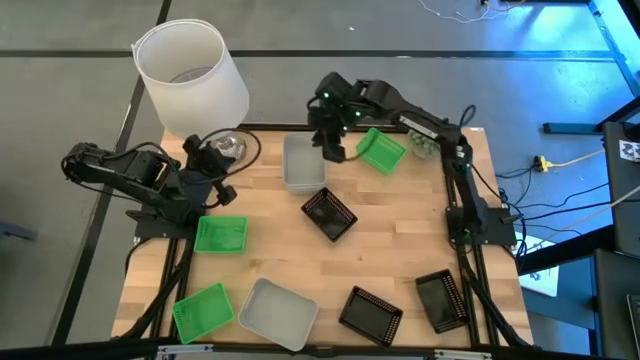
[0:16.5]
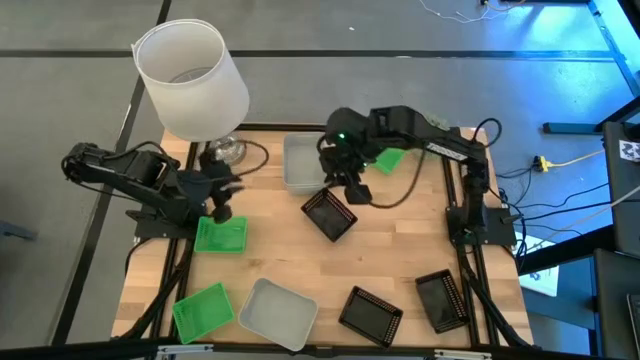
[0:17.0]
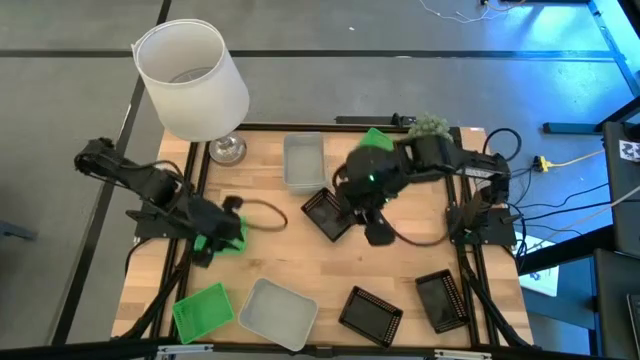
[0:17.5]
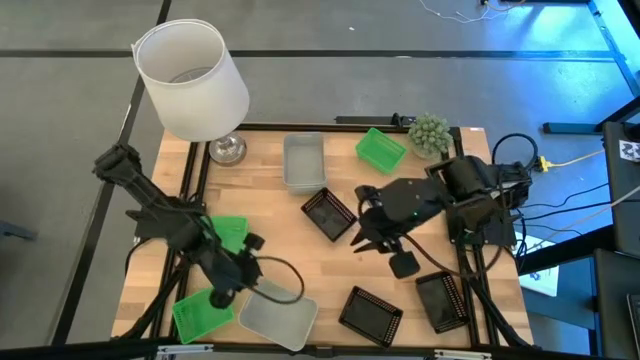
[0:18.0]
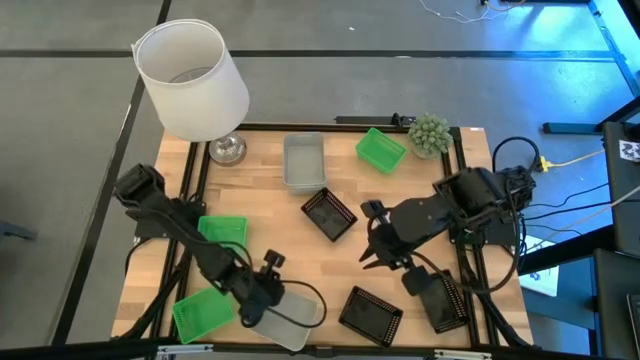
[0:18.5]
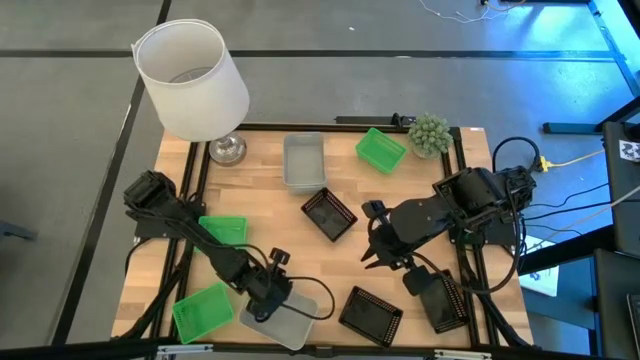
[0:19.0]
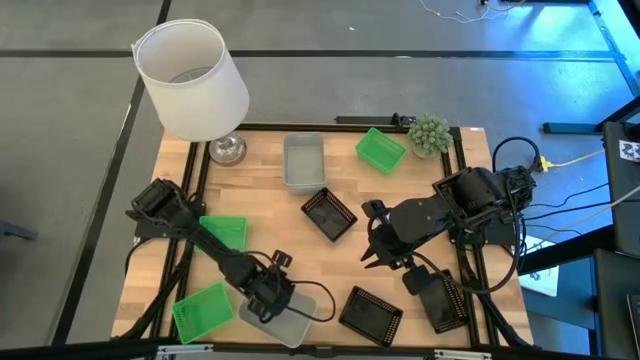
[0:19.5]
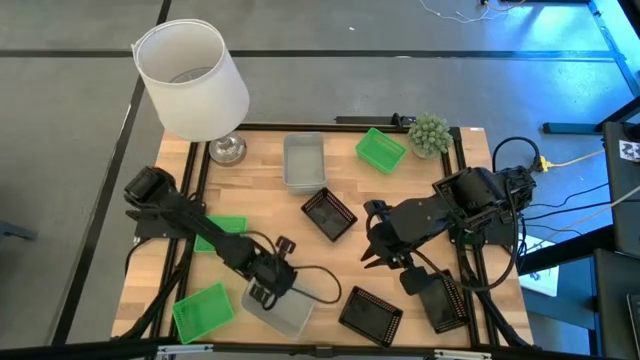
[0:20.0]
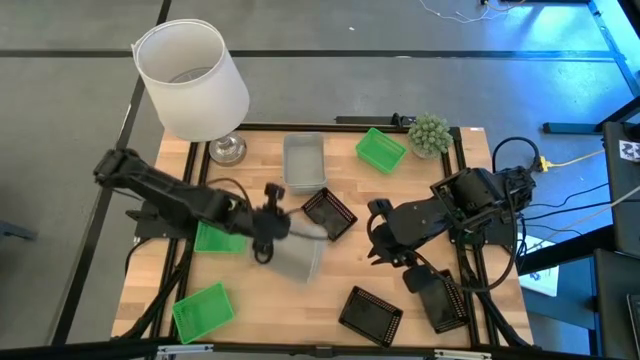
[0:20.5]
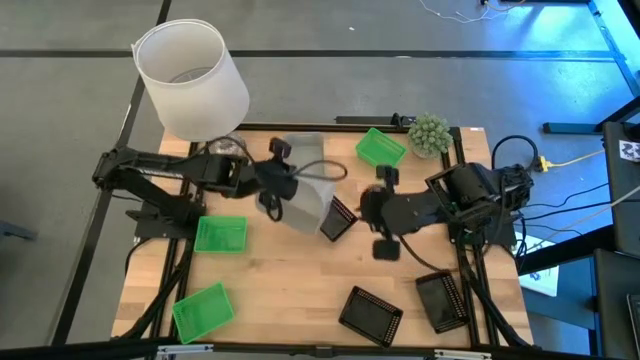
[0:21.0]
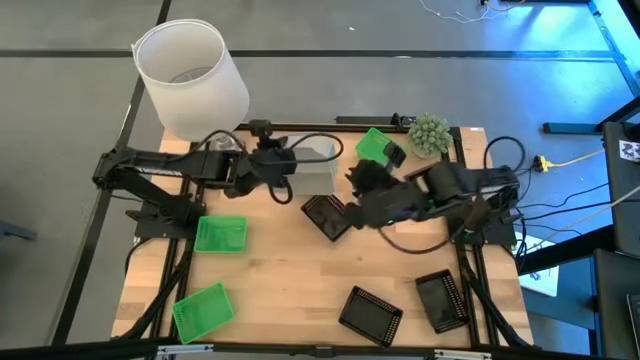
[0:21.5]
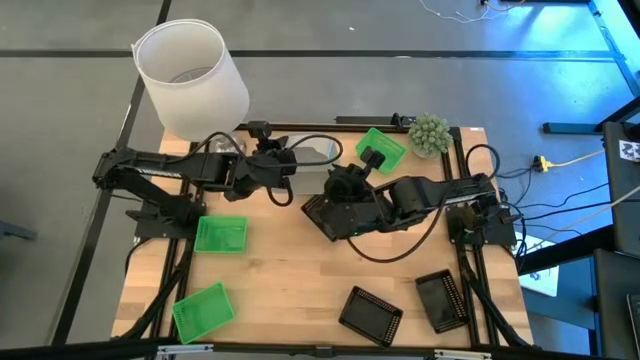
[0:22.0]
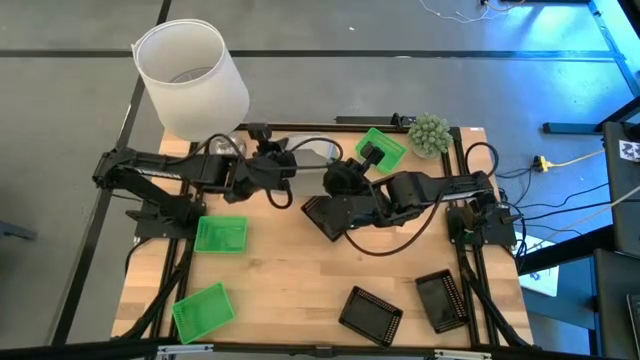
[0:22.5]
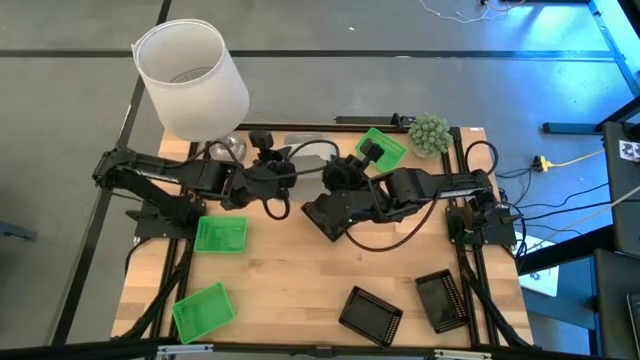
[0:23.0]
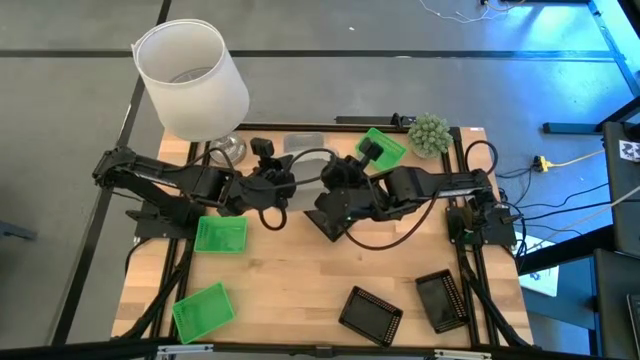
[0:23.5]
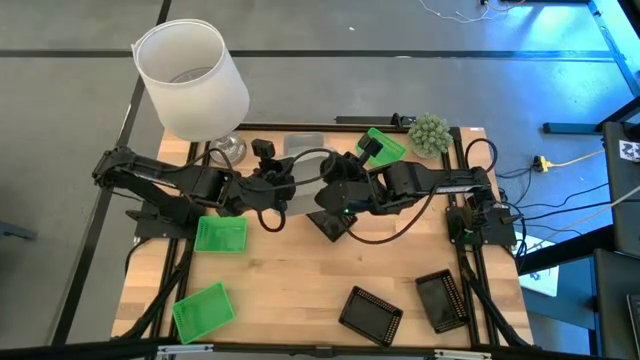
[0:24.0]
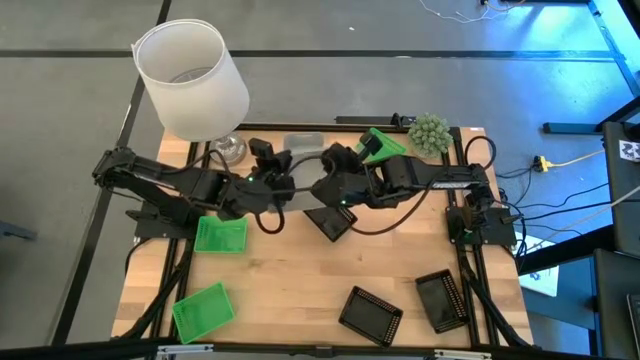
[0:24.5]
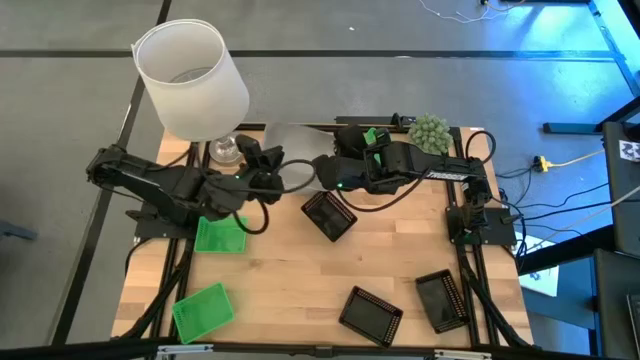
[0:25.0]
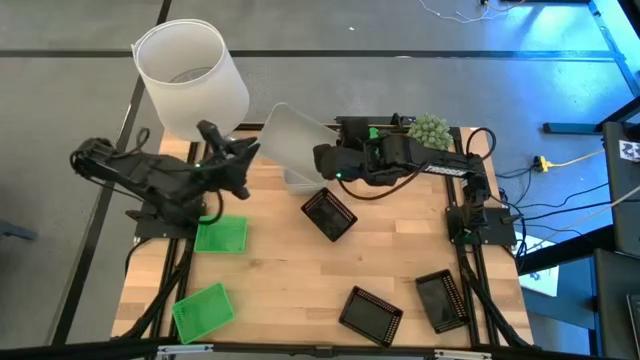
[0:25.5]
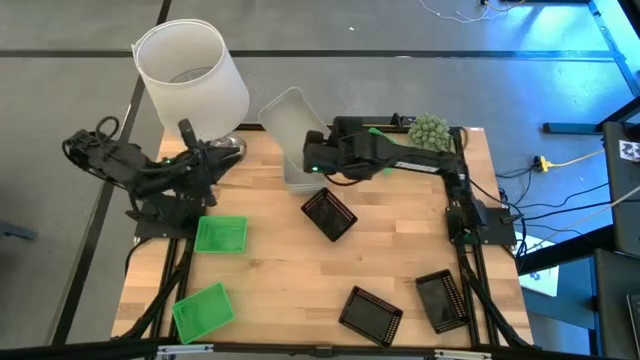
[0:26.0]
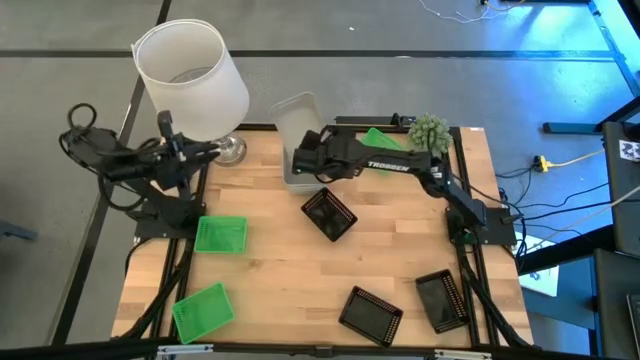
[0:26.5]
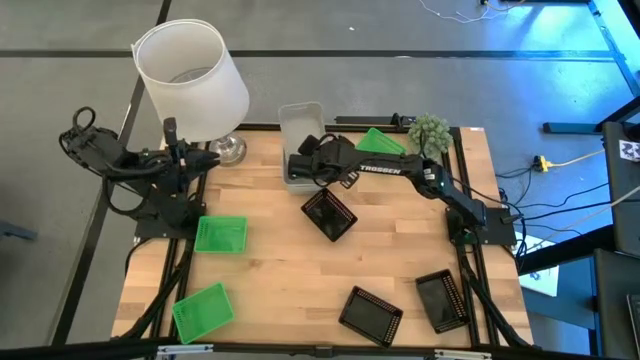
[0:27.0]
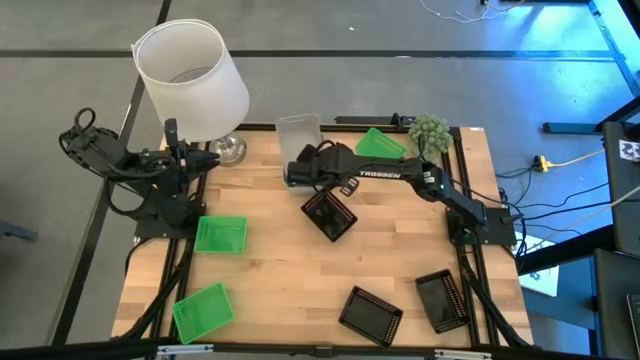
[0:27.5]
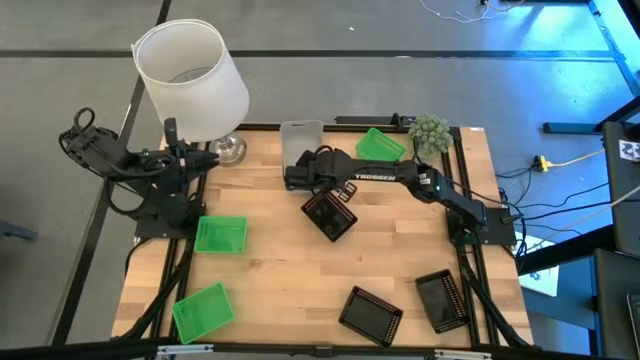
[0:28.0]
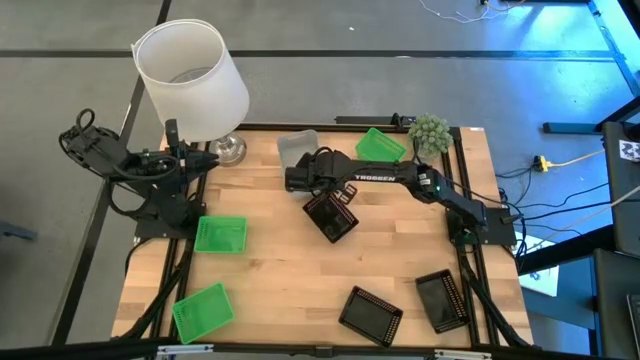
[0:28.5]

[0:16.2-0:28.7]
Stack the bottom gray bin on the top gray bins

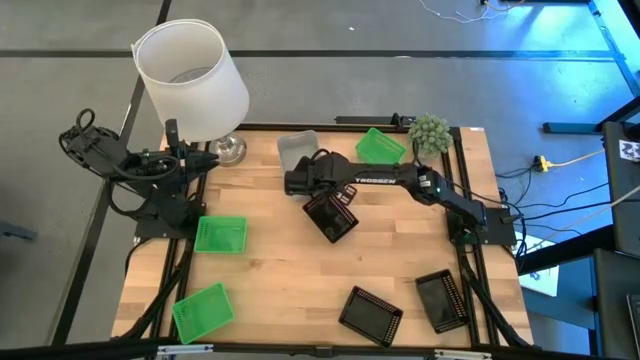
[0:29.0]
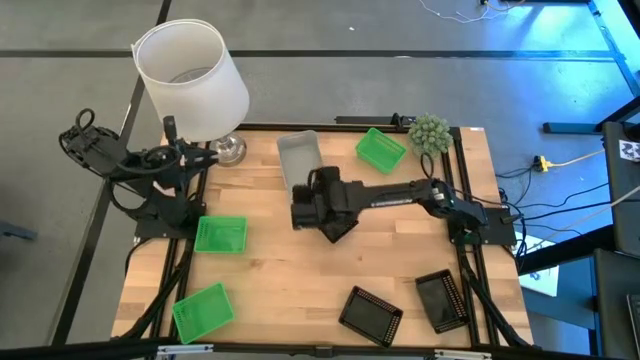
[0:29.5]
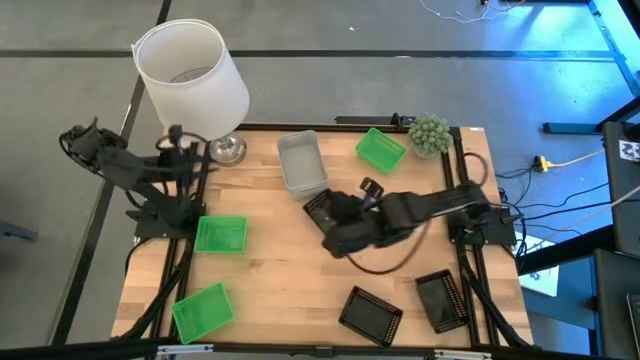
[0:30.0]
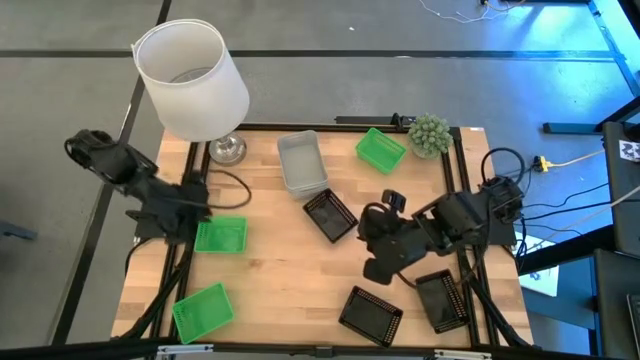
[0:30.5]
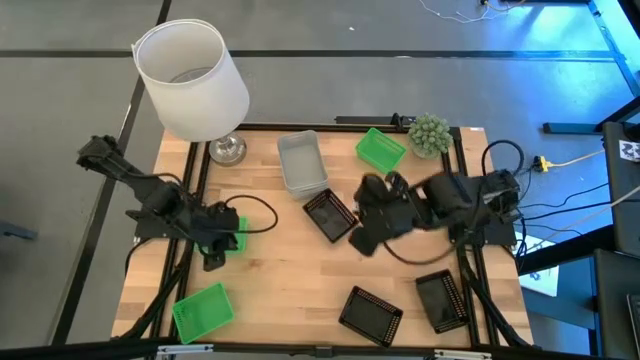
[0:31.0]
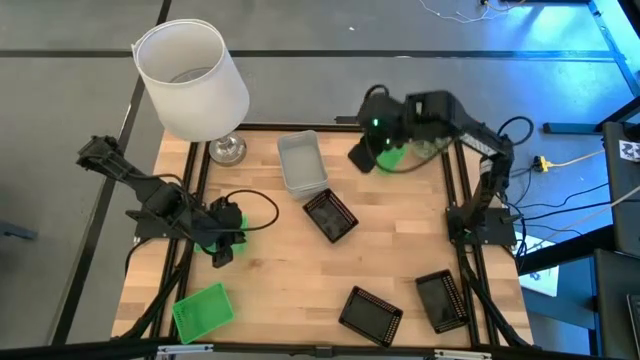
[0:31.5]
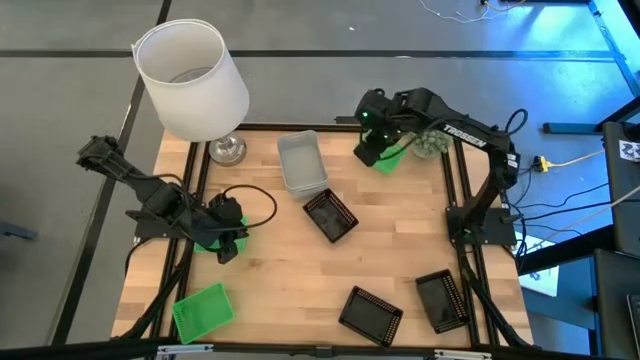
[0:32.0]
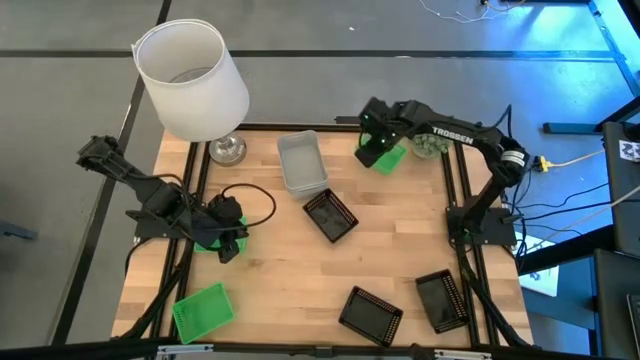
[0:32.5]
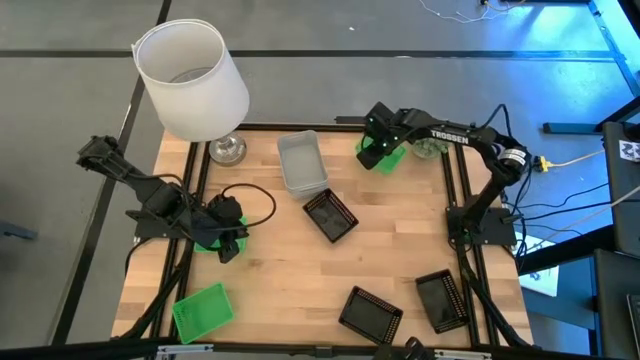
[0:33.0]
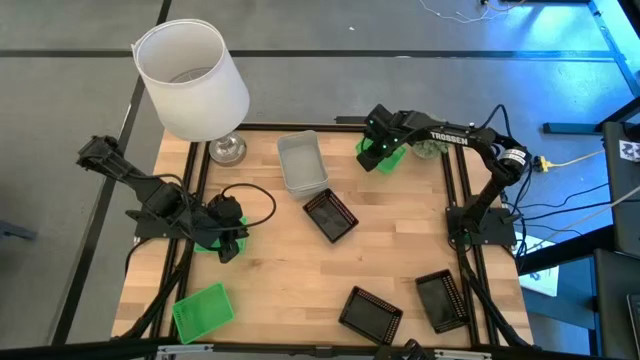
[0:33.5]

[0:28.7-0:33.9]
Stack the top right green bin on the middle green bin
